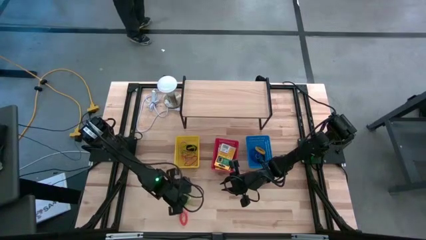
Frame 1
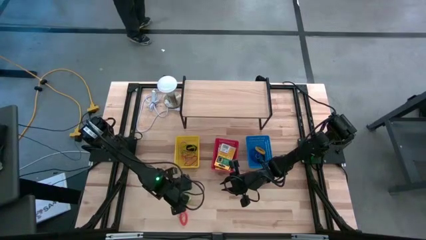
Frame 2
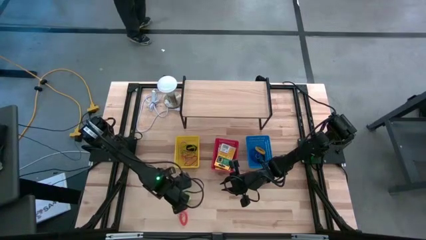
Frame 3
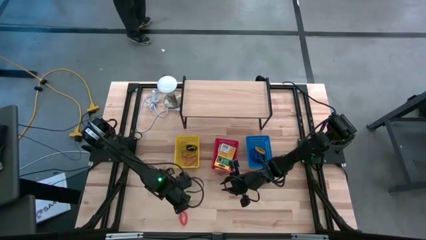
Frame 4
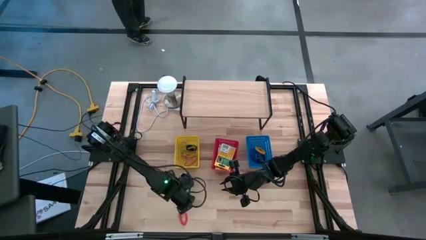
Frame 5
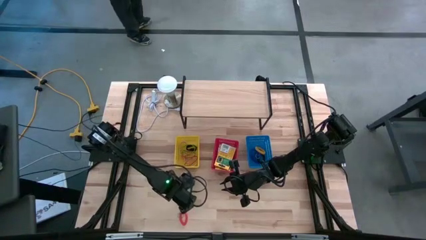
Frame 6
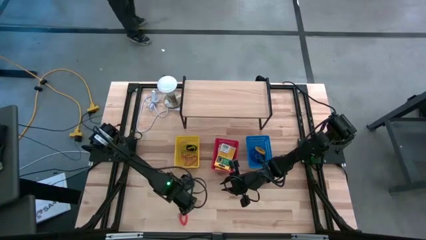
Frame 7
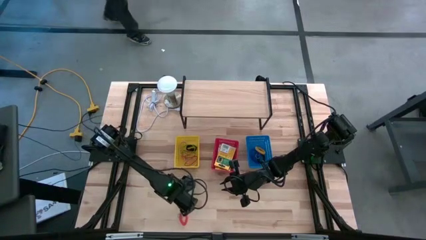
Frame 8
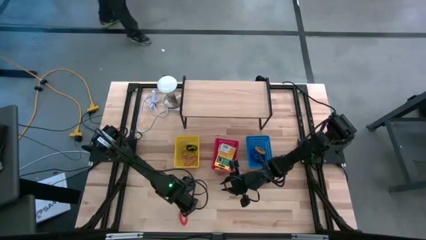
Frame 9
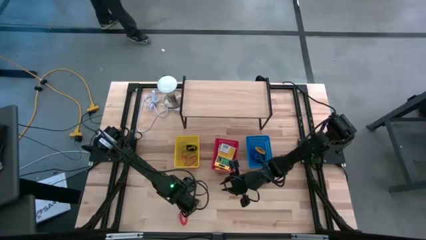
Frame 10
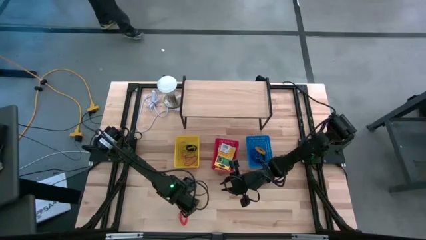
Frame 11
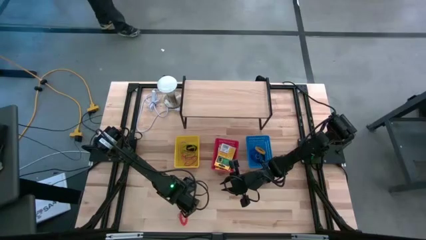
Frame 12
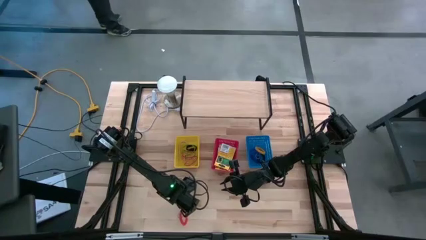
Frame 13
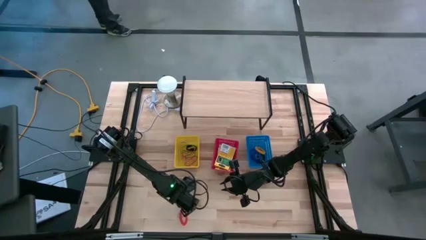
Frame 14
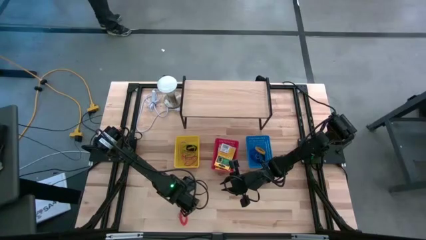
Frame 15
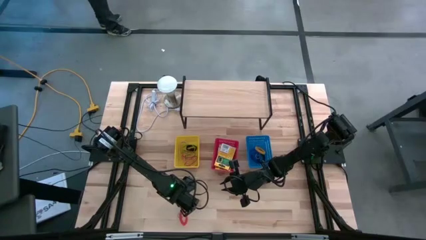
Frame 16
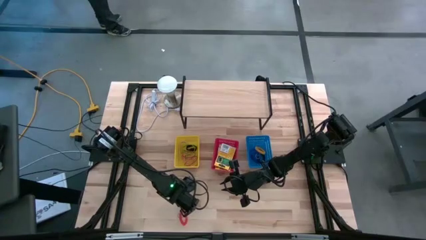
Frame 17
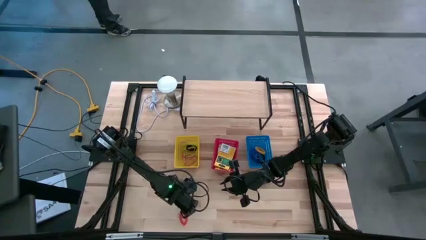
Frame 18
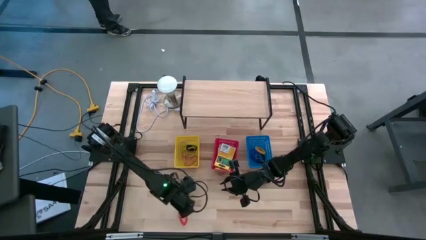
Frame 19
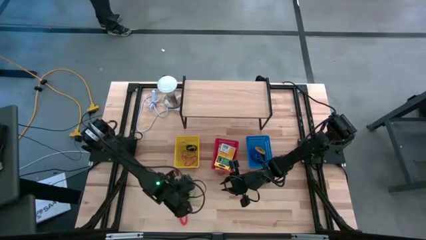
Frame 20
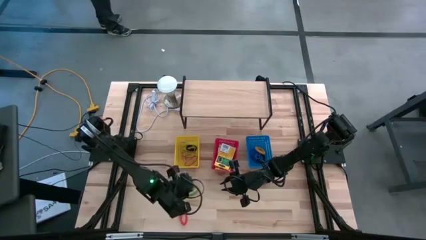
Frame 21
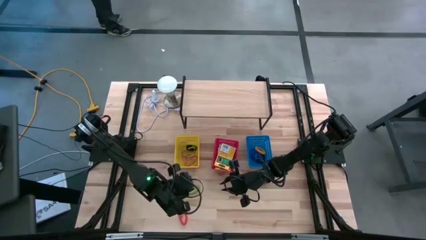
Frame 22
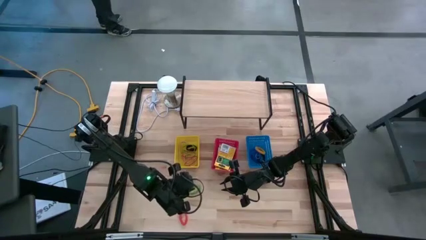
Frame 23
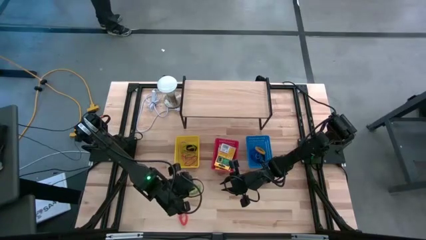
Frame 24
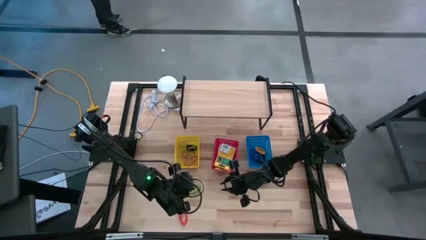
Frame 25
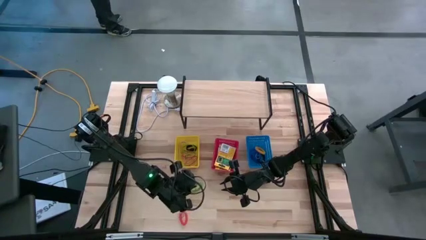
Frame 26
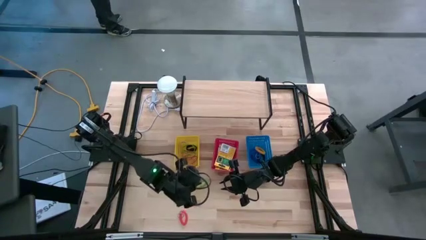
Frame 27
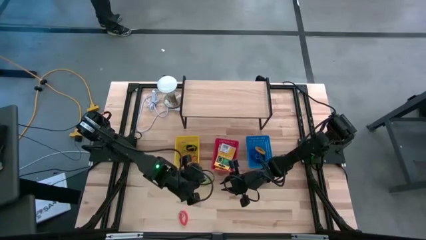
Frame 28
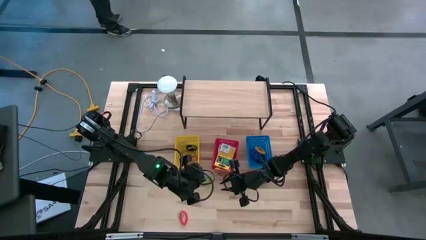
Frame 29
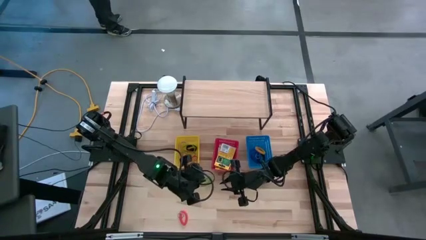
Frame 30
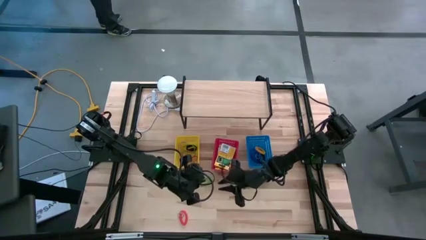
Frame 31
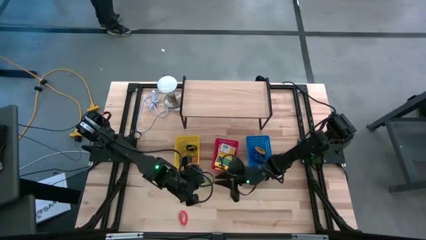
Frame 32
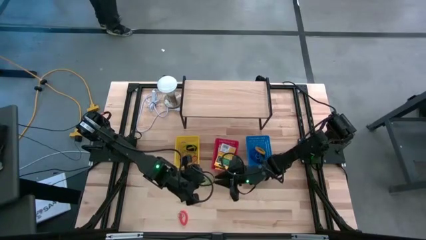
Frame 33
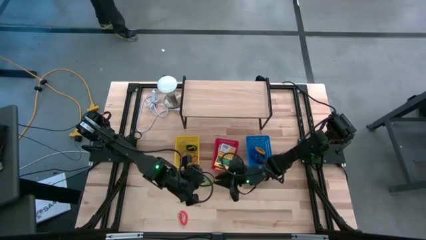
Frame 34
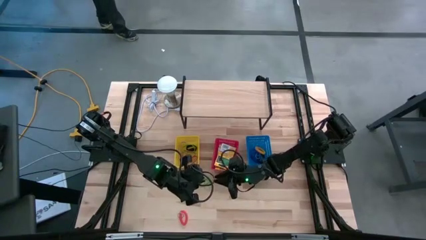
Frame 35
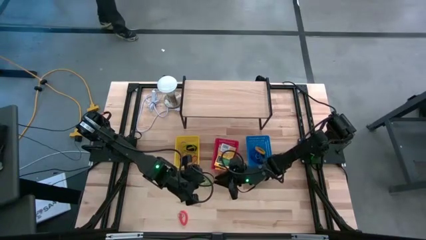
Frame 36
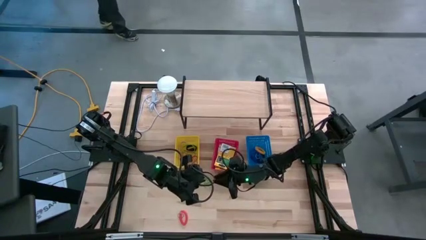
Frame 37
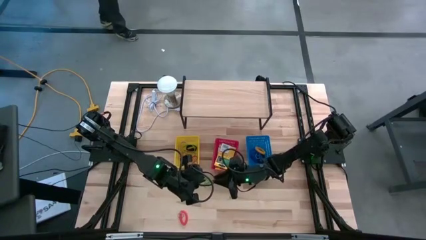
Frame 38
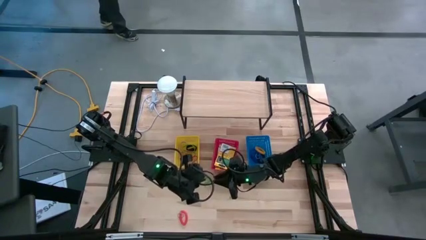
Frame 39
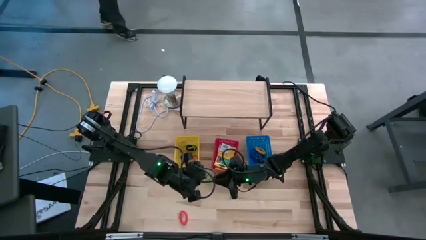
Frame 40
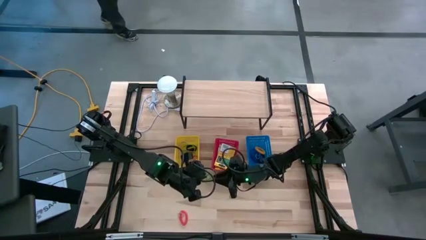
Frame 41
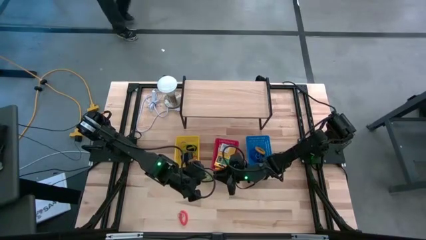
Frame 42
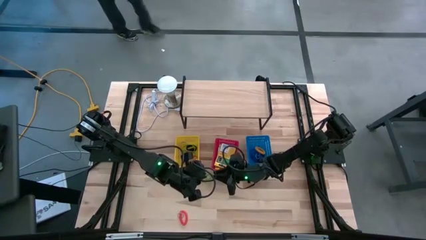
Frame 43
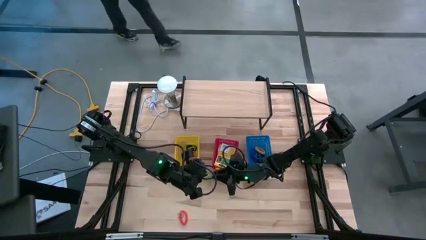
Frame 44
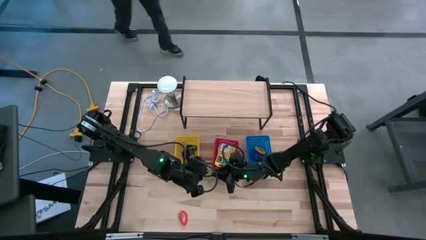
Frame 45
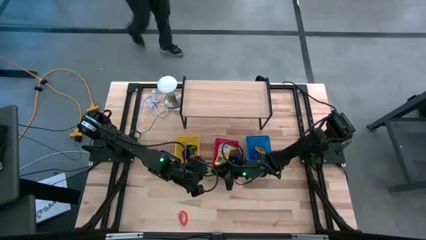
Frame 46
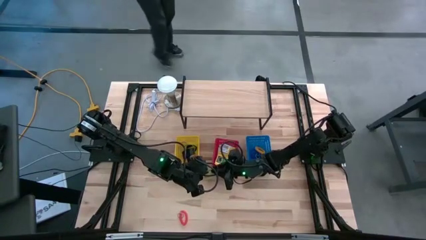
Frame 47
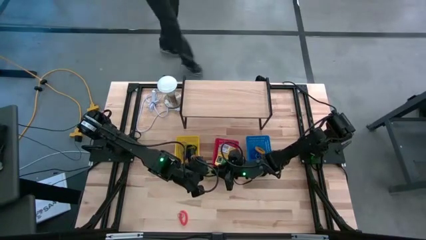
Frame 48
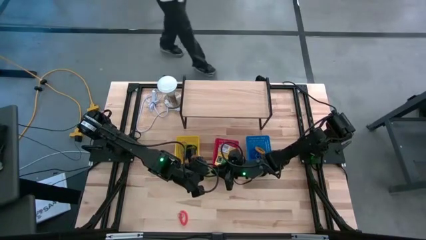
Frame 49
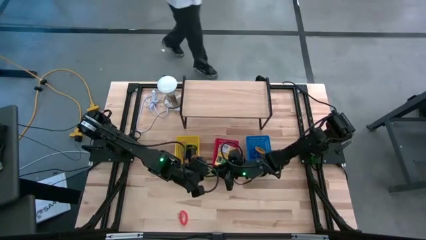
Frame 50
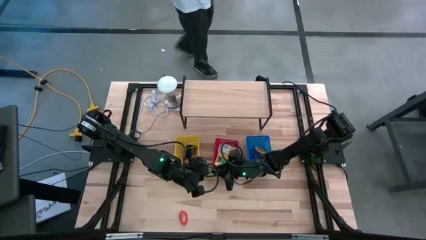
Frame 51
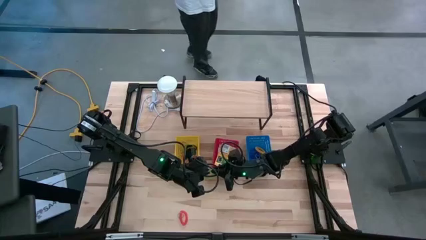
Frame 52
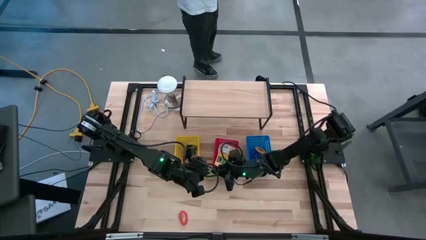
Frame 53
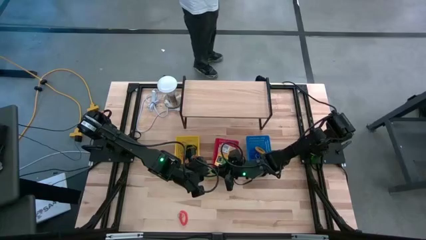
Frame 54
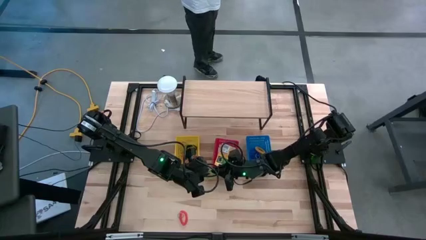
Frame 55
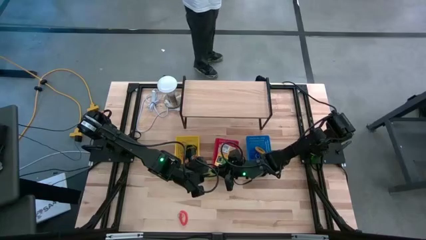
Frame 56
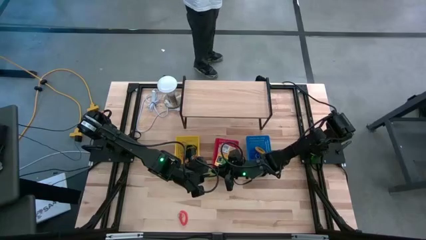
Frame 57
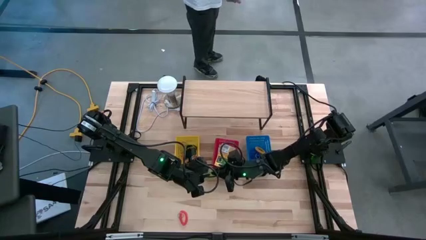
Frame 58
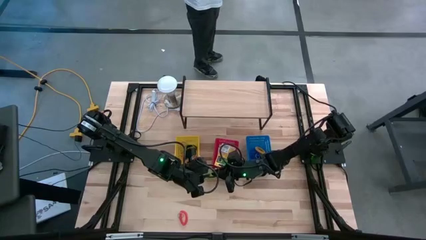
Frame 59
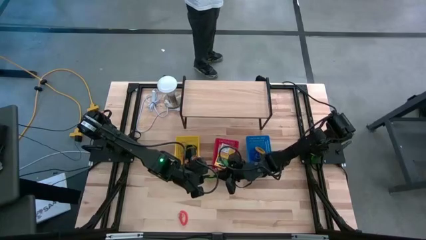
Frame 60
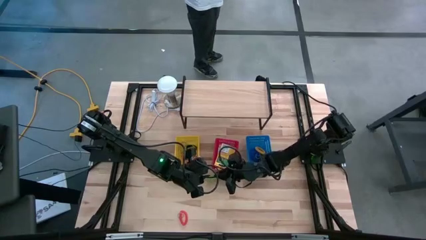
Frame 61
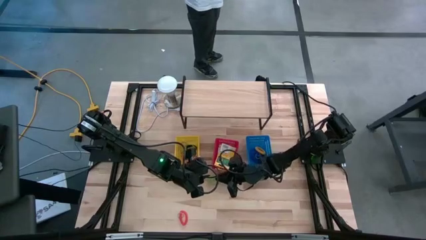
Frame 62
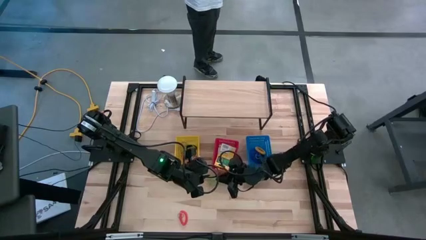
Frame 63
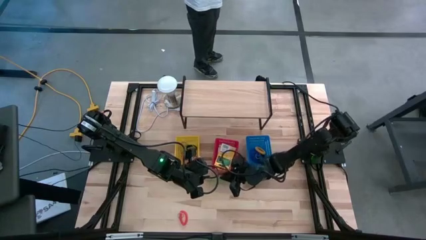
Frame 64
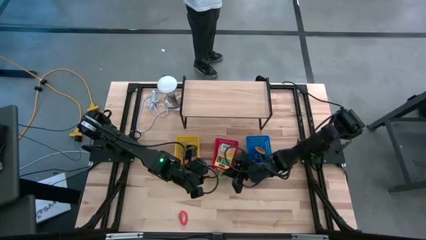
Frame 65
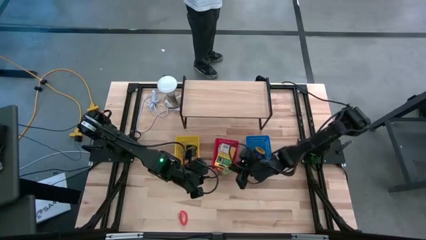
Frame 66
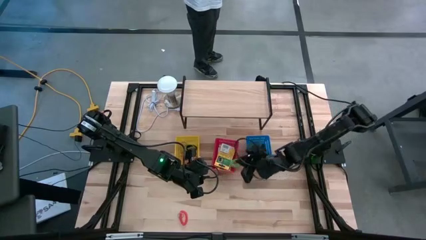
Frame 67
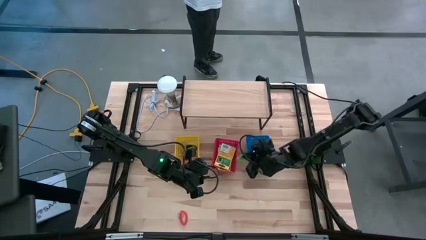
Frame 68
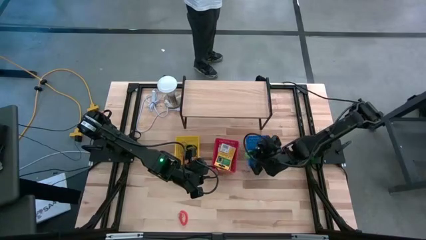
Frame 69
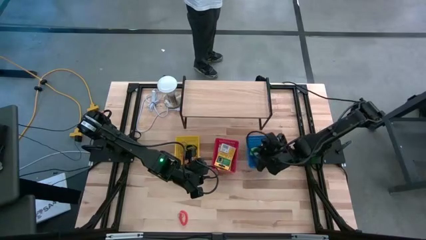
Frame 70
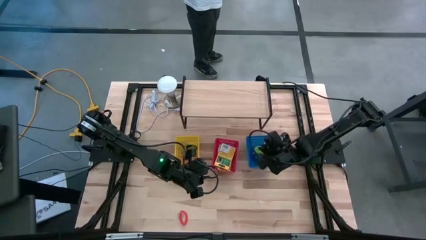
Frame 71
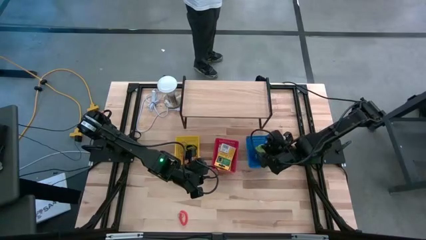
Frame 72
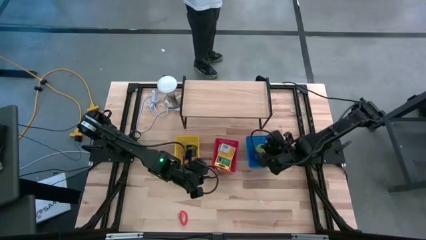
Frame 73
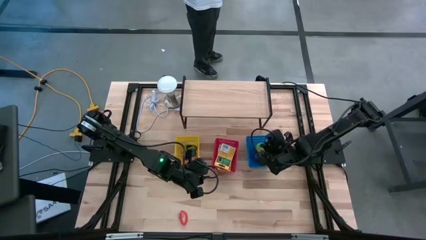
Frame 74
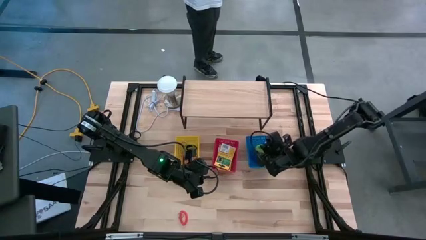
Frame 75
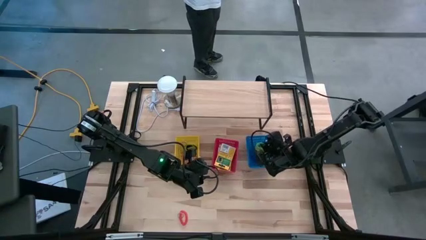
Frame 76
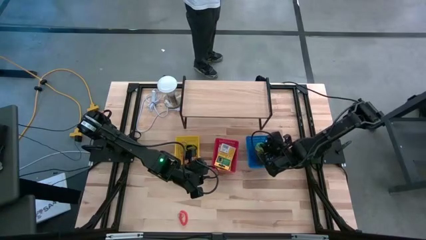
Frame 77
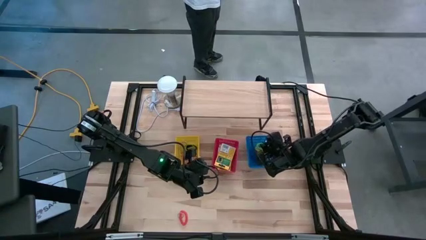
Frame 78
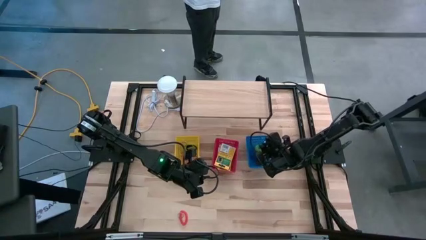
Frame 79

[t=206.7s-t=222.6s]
Task: Pick & Place Office Desk Supplies
Put the green spiral keychain into the blue bin
